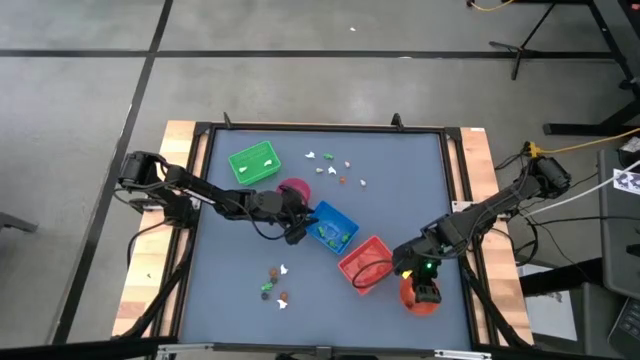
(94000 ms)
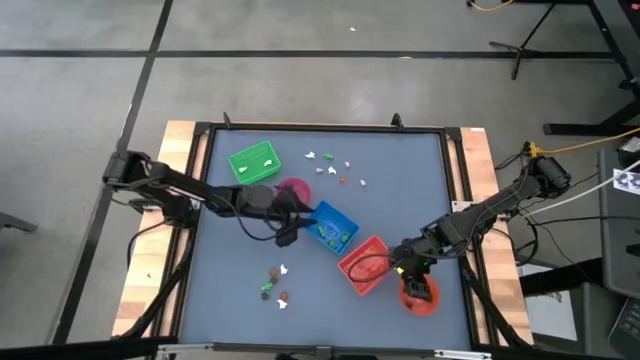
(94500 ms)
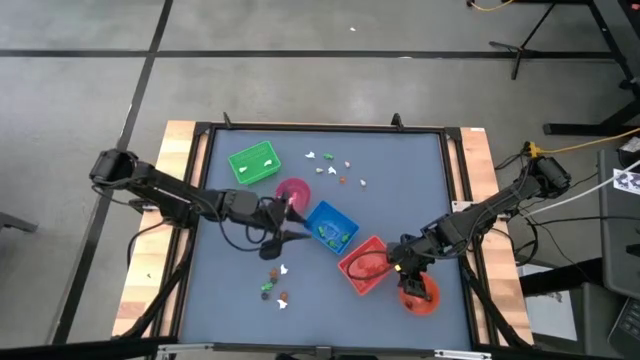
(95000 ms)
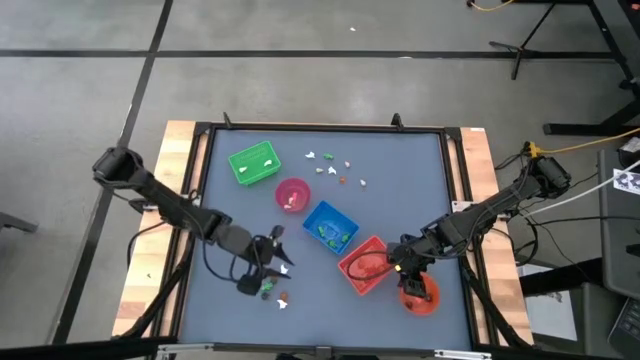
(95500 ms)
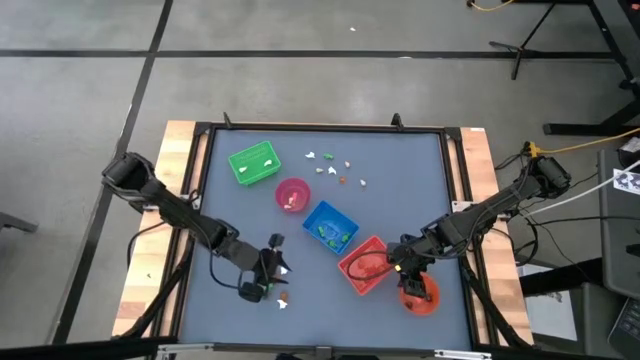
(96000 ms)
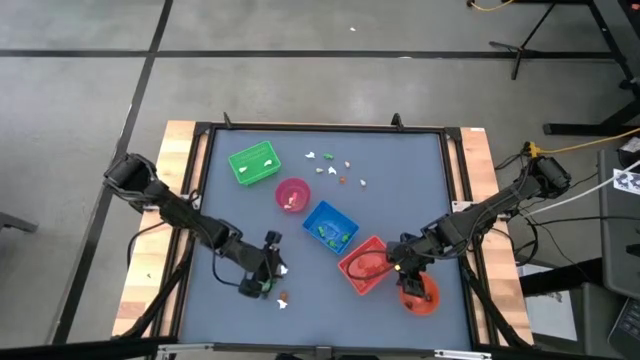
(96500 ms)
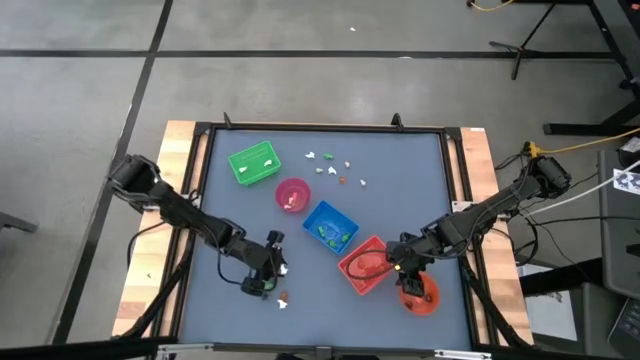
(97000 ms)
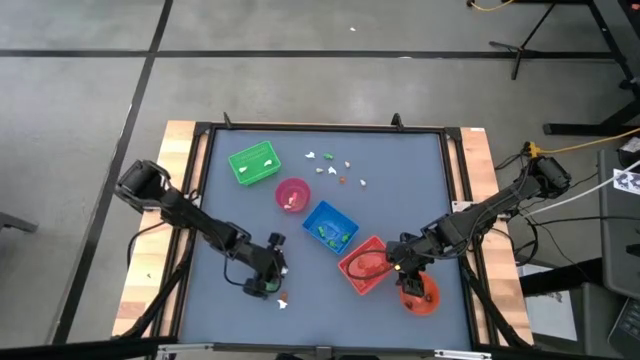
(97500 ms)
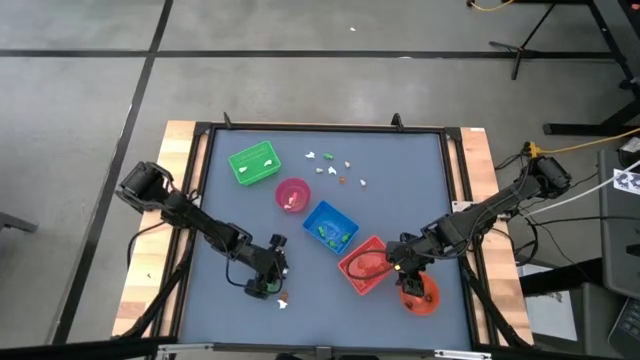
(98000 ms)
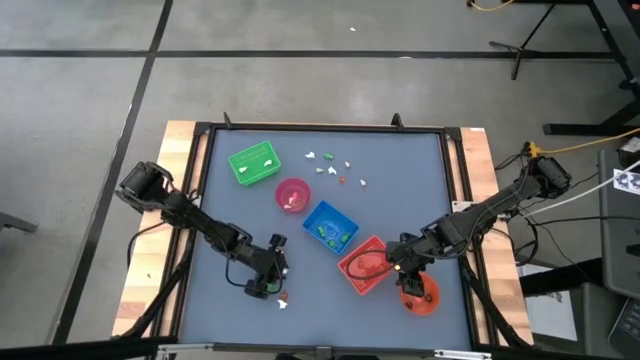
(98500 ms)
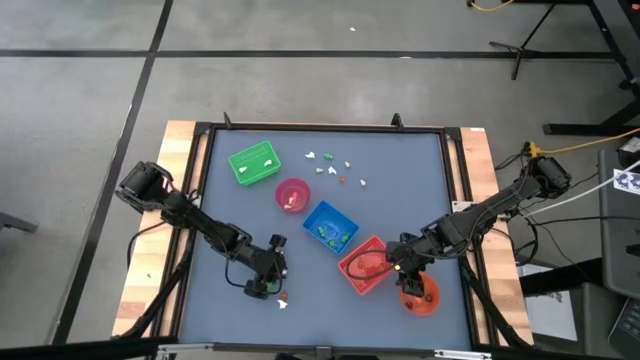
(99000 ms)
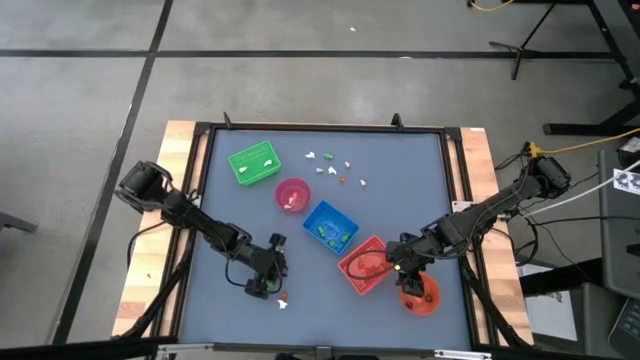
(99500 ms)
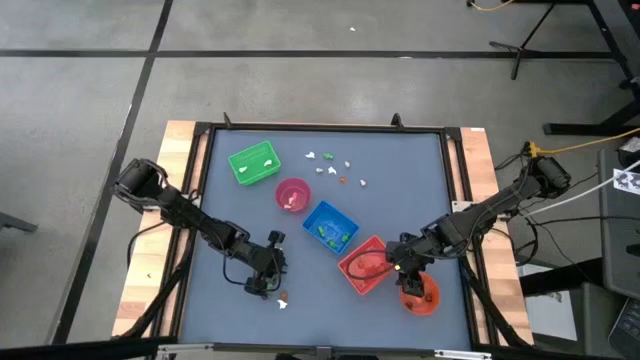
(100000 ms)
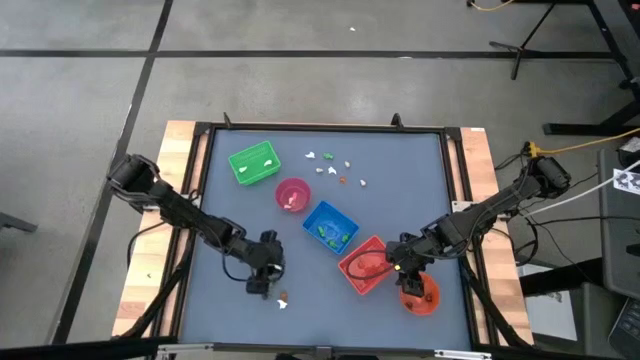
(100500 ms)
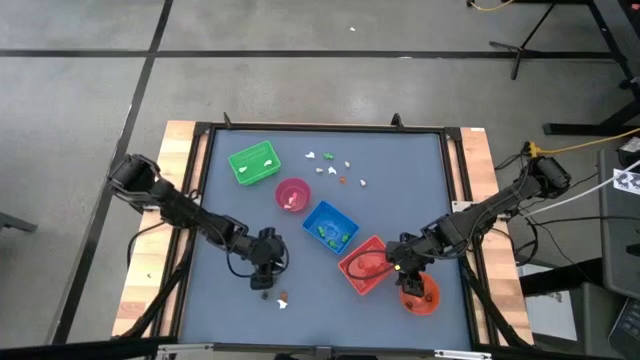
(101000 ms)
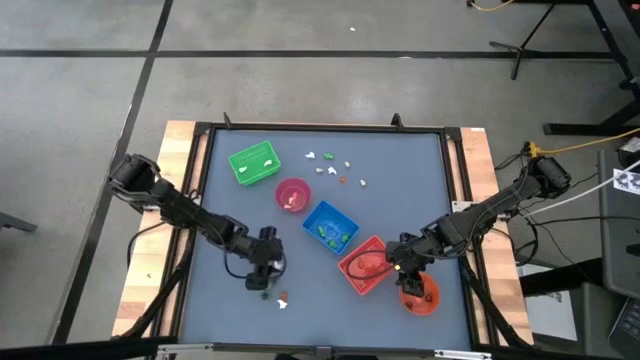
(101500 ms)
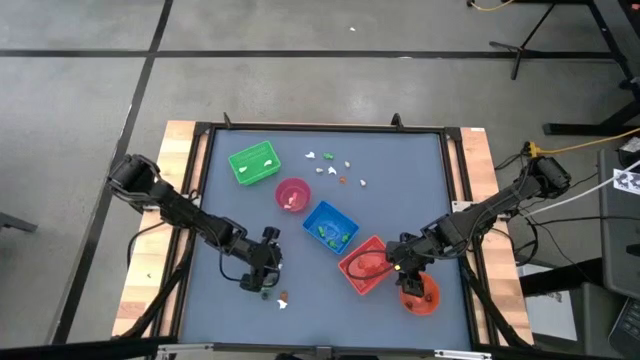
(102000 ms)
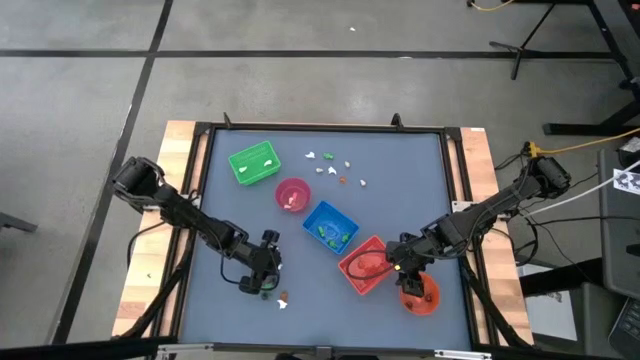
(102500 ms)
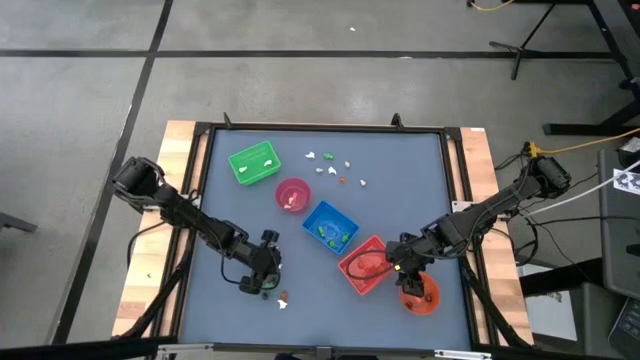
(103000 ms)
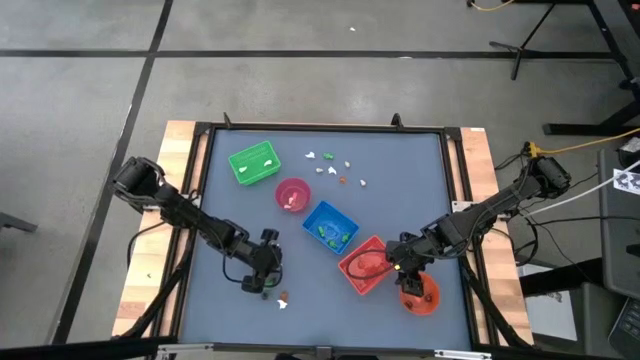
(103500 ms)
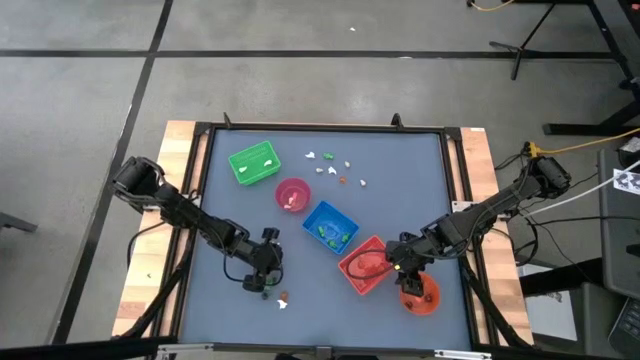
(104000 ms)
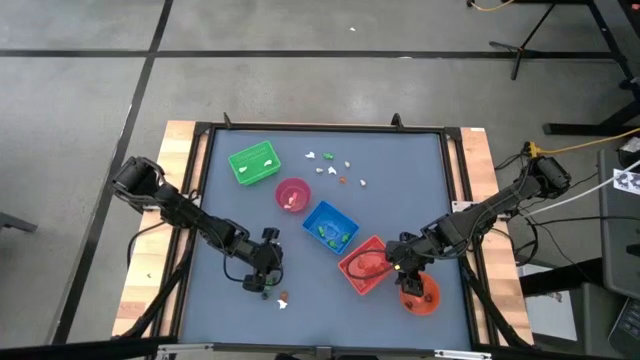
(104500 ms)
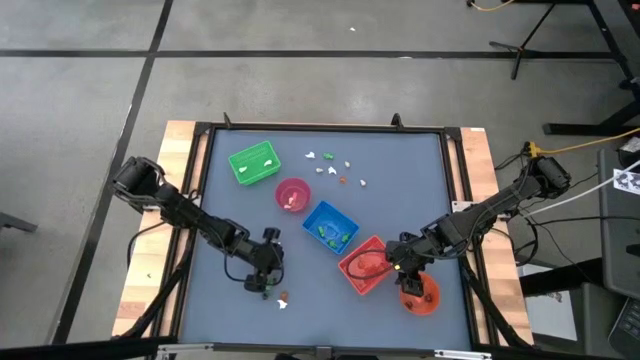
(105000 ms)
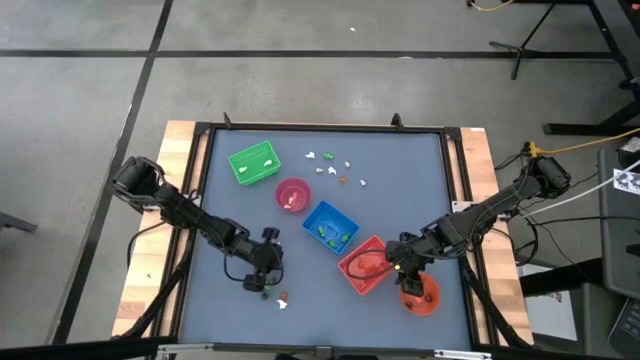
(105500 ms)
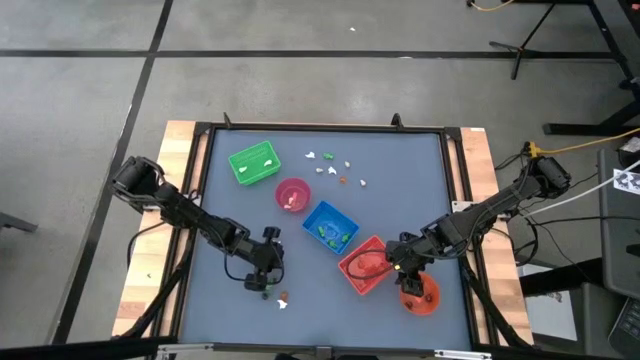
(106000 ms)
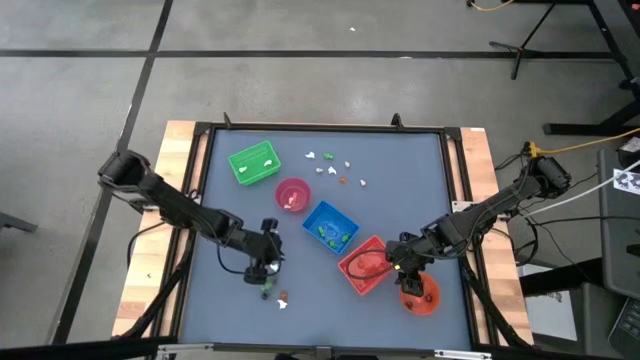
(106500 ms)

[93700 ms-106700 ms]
Task: Sort Halloween decoration
Put the white ghost toy into the green bin

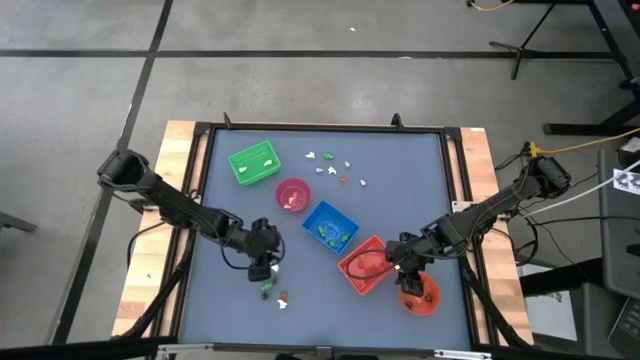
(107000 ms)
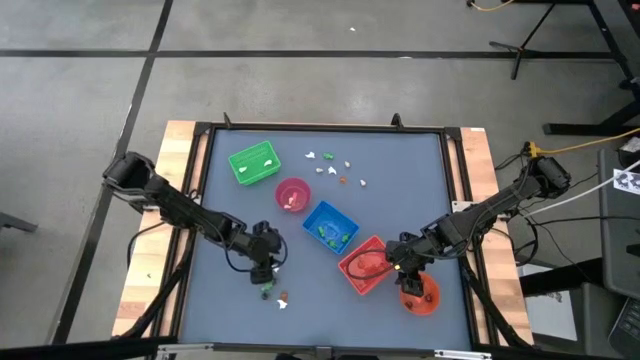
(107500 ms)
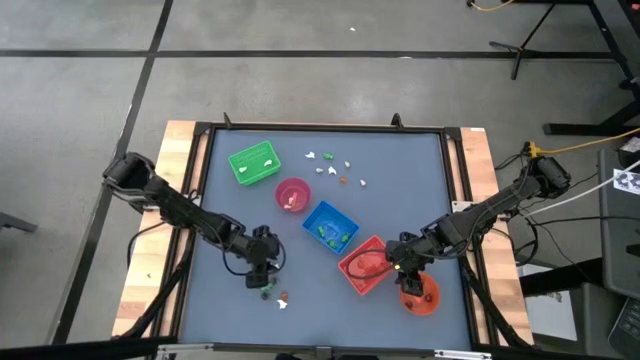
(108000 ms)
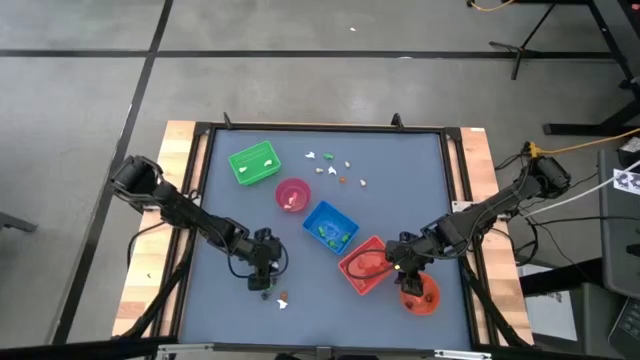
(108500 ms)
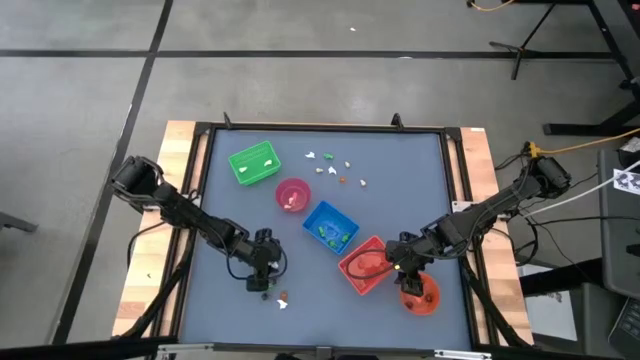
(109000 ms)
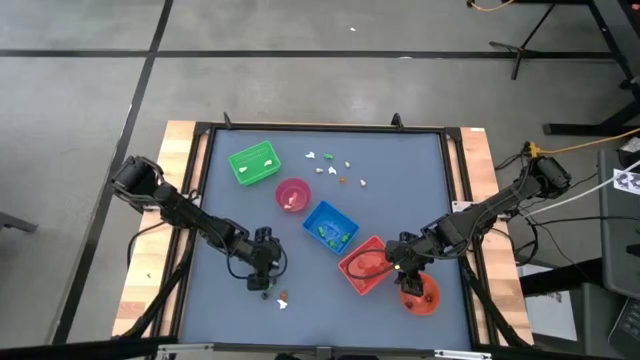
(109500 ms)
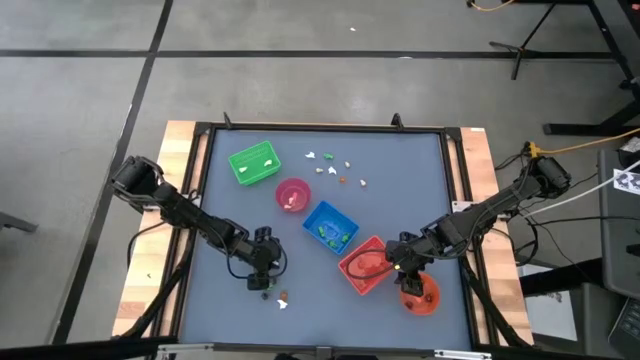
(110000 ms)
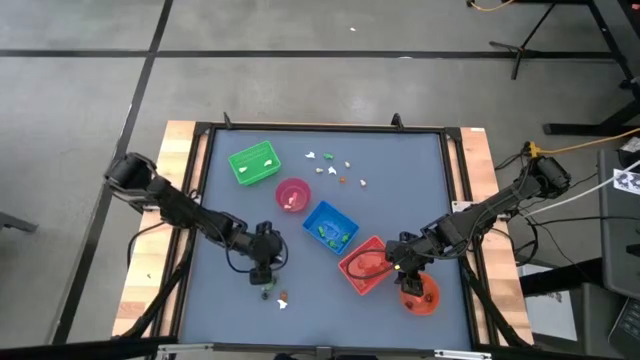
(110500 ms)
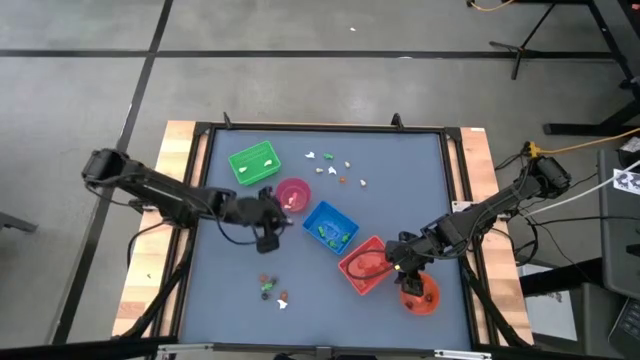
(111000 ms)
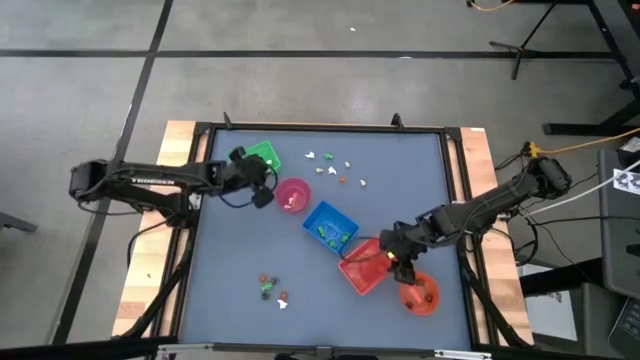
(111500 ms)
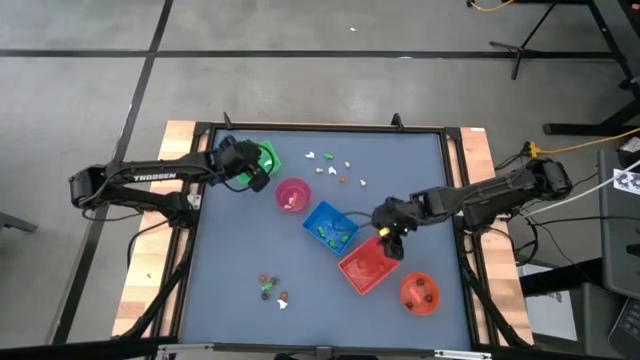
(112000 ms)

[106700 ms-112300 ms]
Put the white ghost toy into the green bin

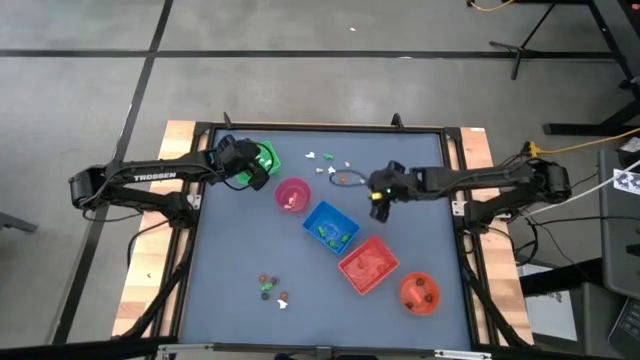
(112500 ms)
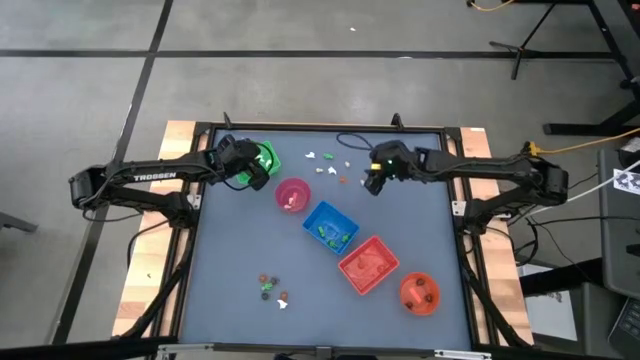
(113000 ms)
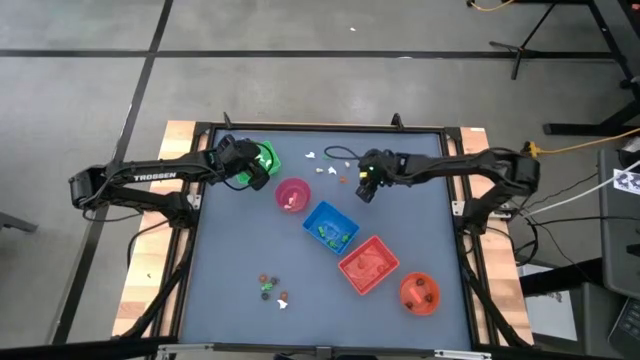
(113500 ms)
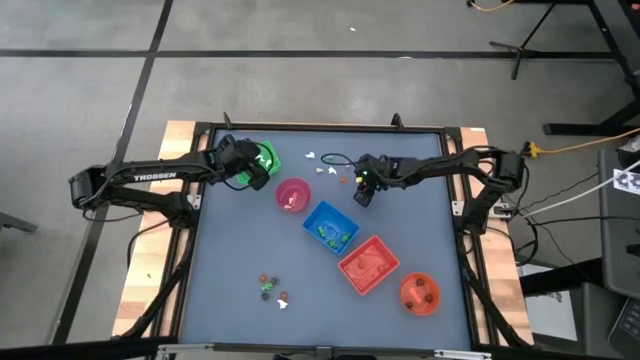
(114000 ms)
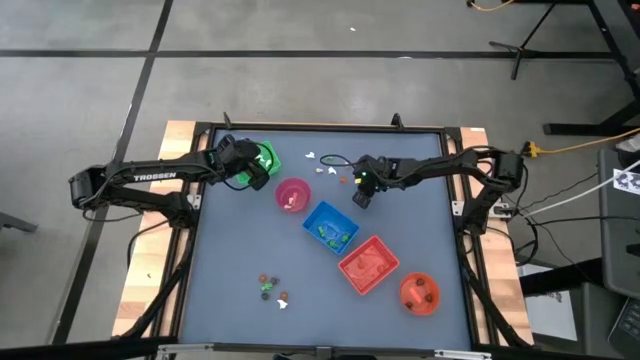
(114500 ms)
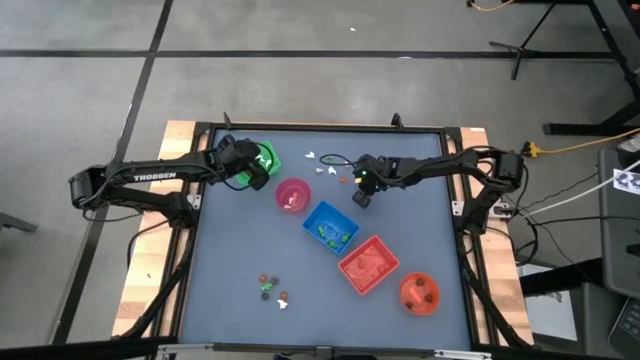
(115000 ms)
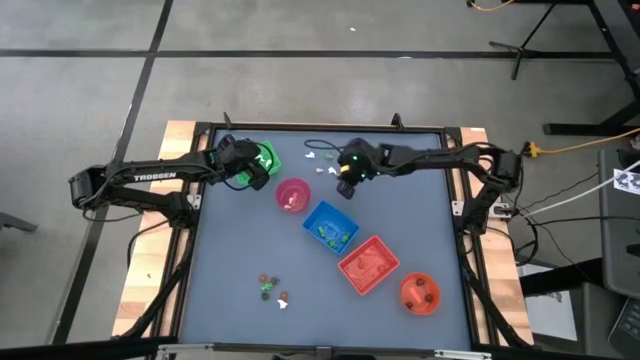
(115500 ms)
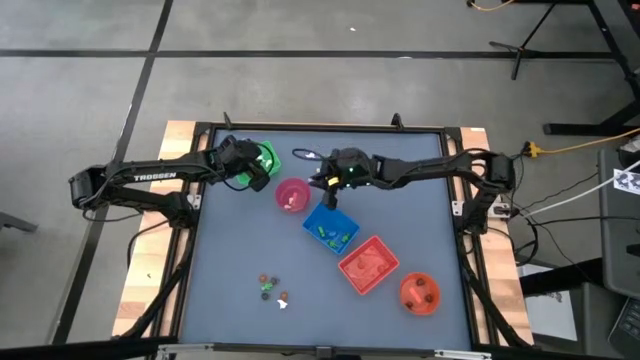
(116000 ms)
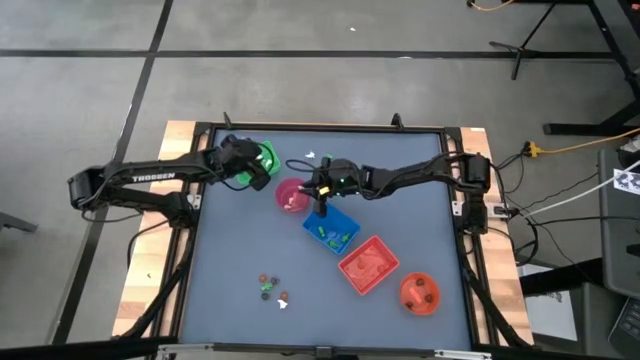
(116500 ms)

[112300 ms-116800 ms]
Put the light brown skull toy into the light red bin
